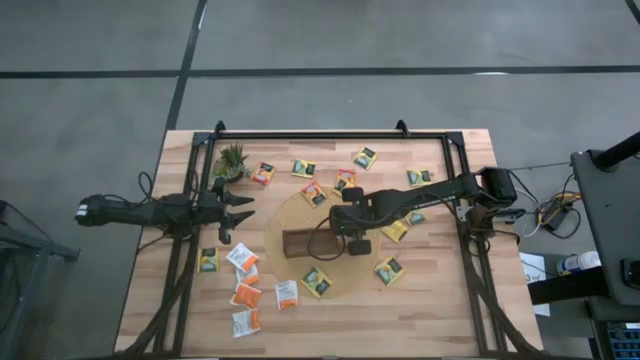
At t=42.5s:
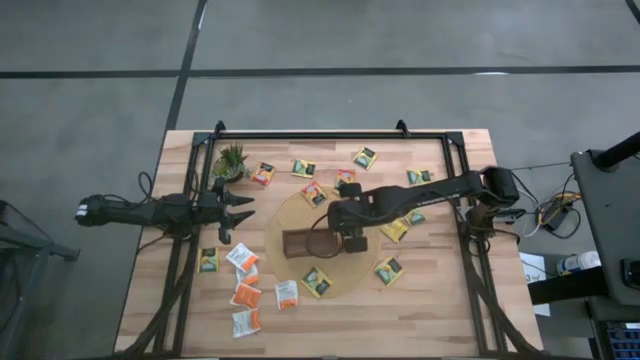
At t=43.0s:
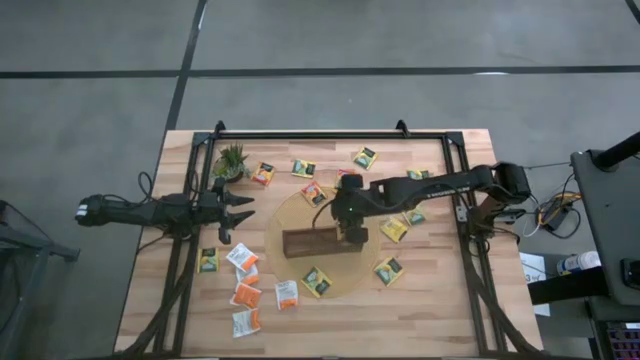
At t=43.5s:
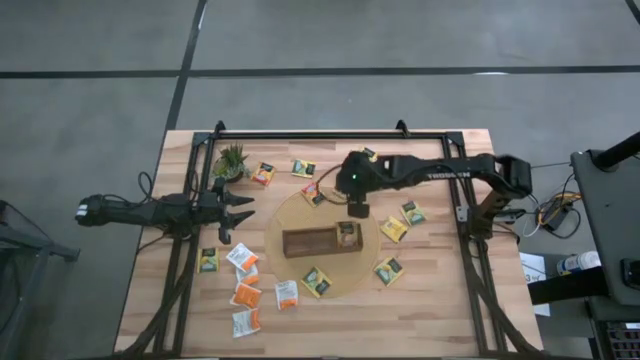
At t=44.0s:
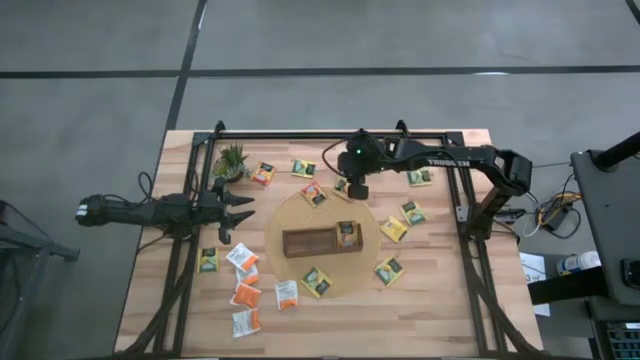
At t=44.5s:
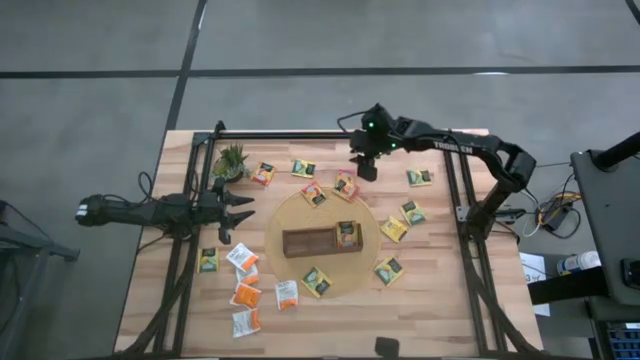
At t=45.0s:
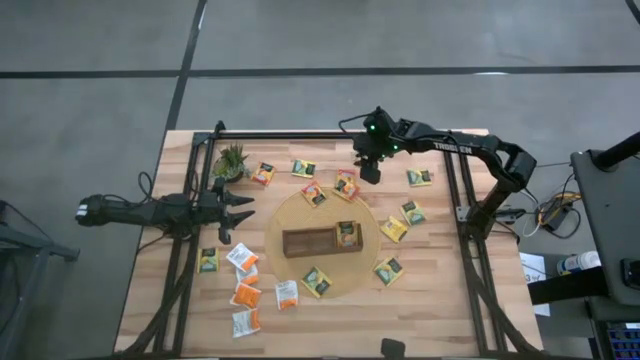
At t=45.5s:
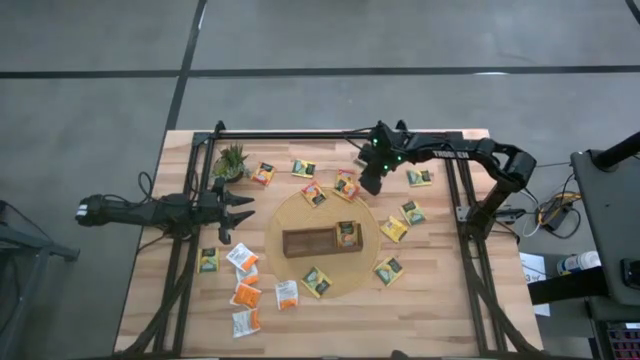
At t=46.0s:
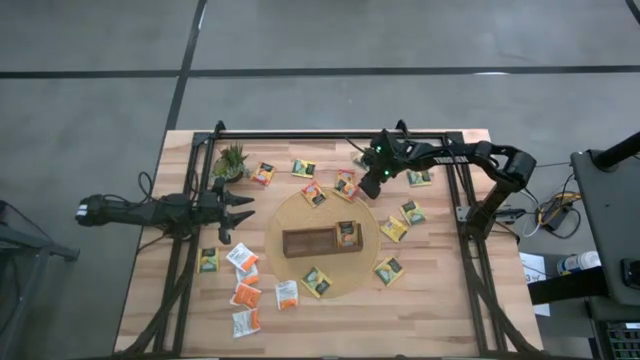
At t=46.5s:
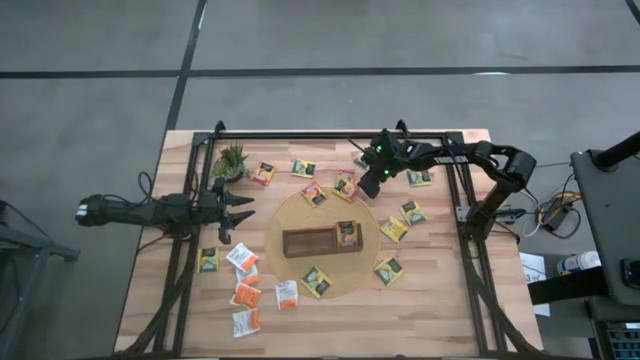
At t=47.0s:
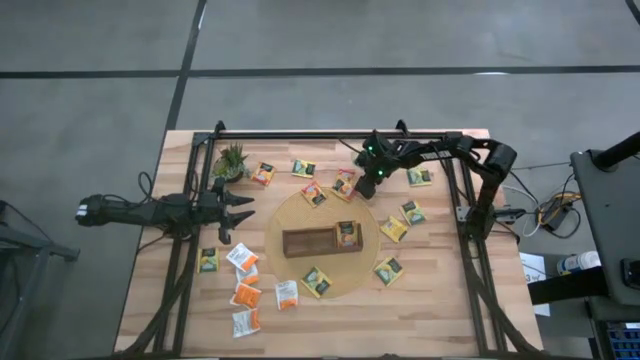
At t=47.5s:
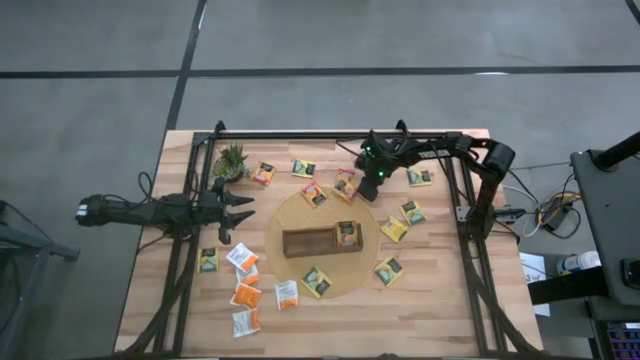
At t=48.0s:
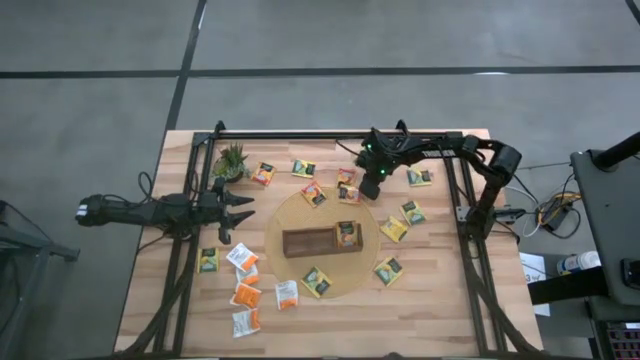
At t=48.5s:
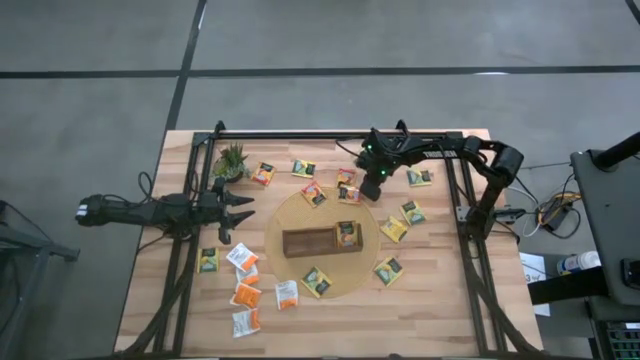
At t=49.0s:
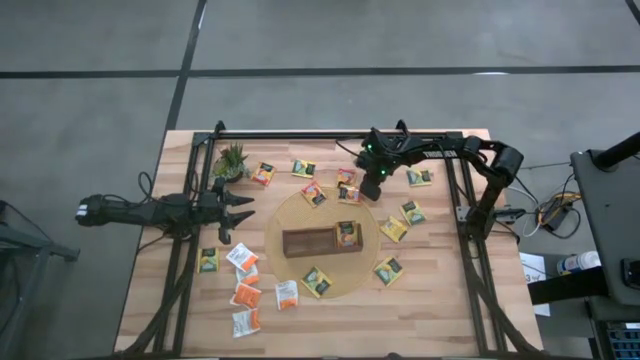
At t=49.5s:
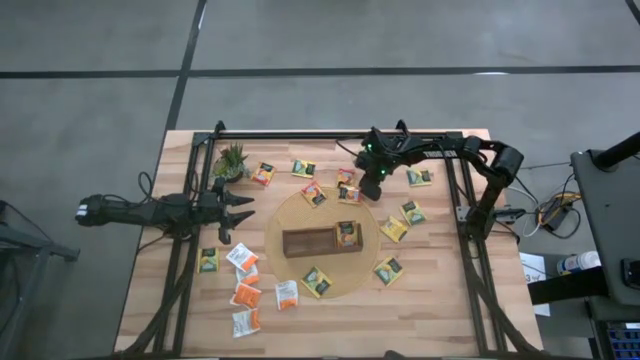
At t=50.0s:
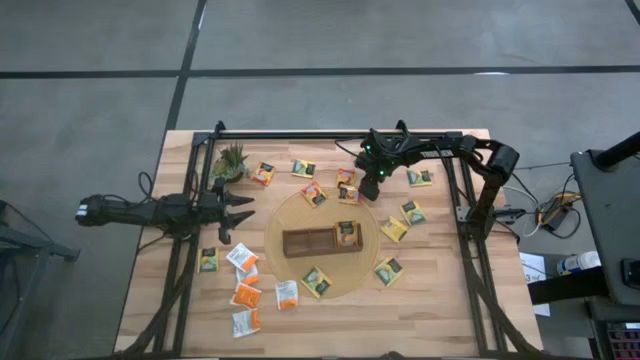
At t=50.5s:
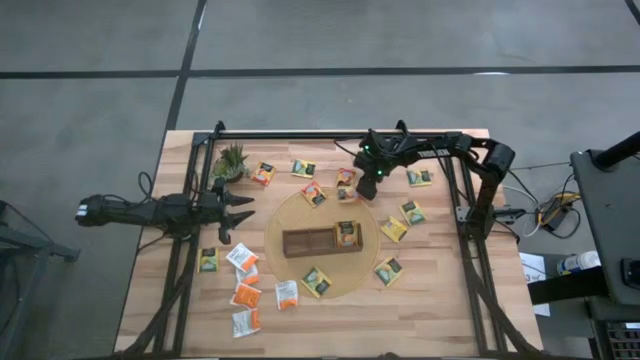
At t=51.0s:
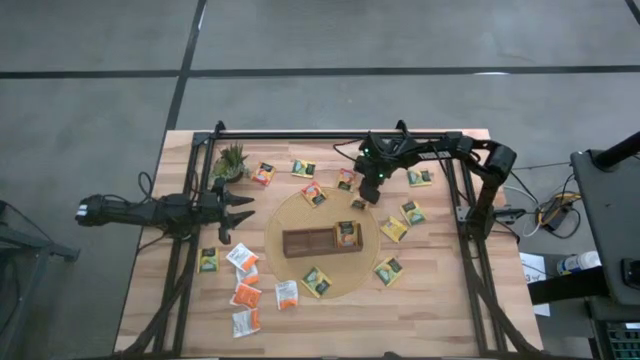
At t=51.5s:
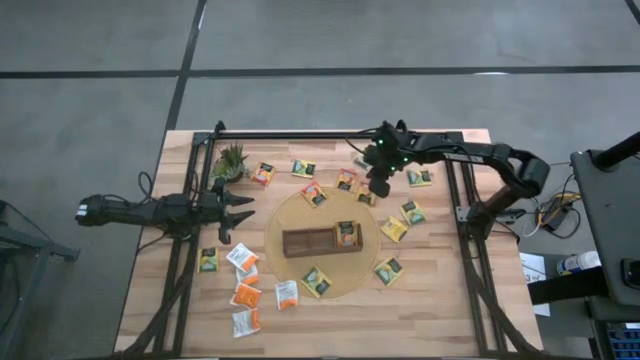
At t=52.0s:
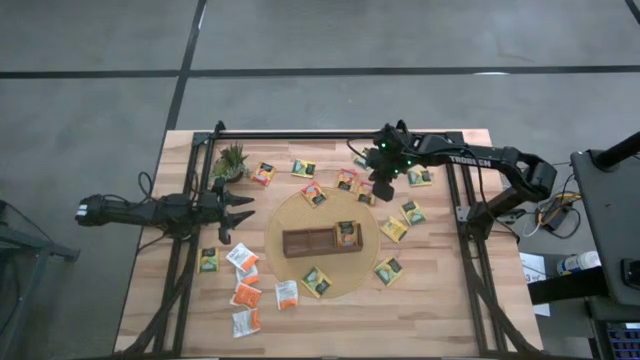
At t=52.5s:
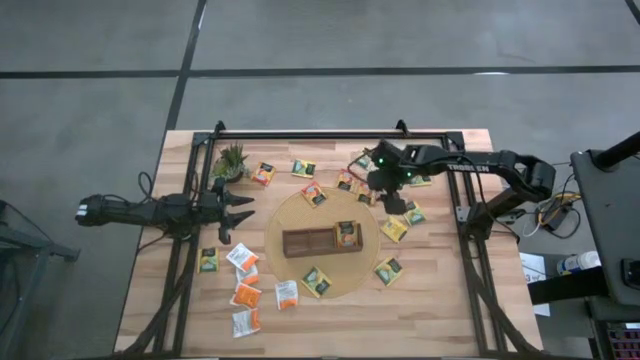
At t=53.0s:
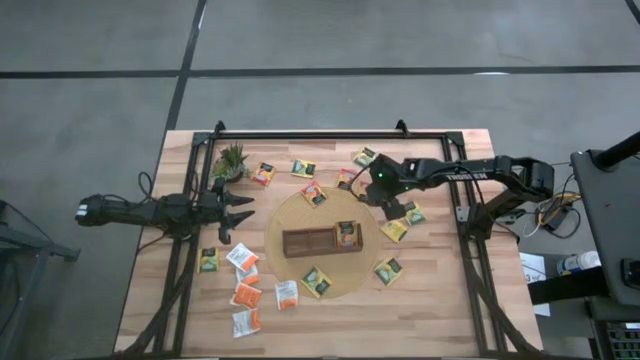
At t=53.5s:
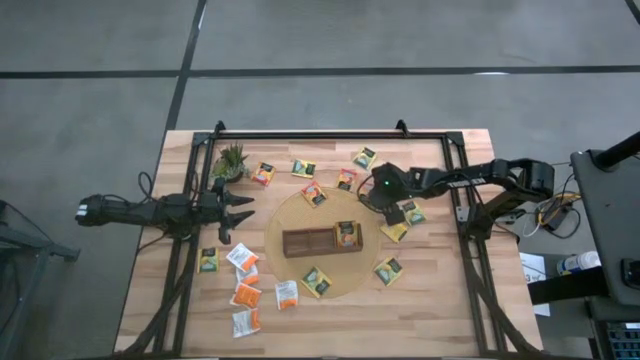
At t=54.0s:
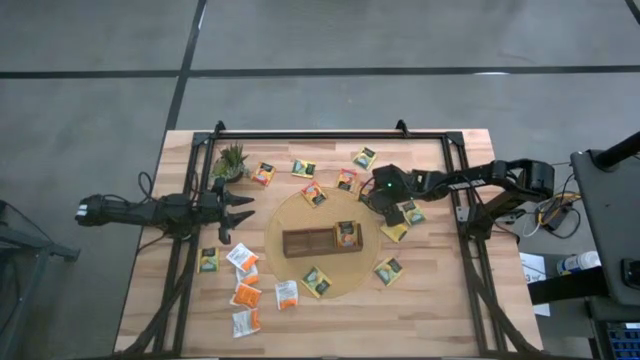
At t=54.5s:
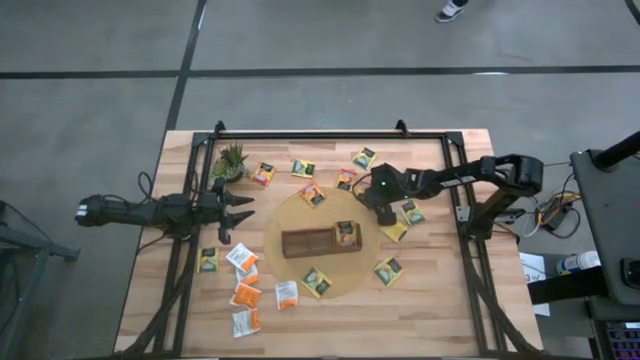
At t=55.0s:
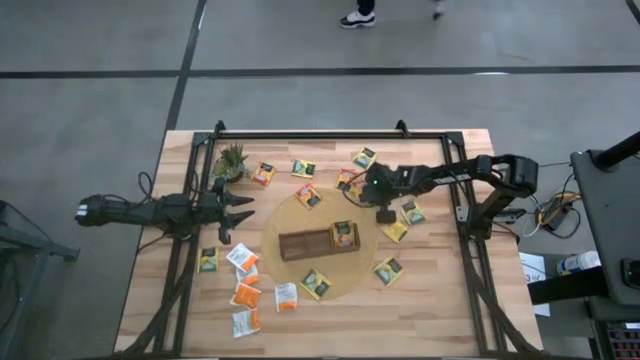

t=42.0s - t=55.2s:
Task: Pick & Place Tea
Put the orange tea bag into the right section of the wooden organizer

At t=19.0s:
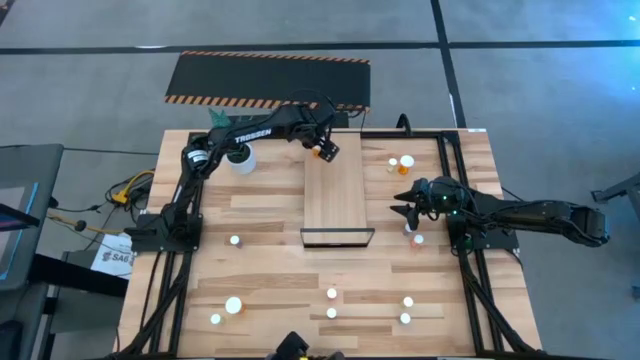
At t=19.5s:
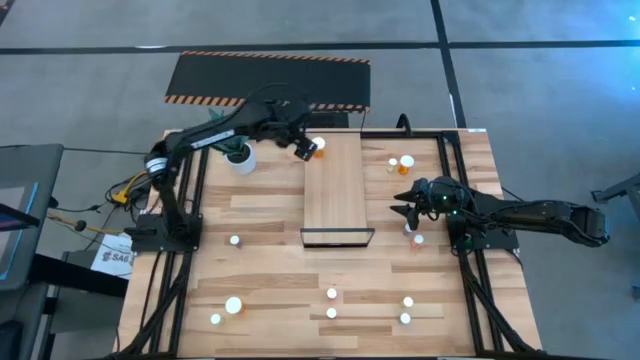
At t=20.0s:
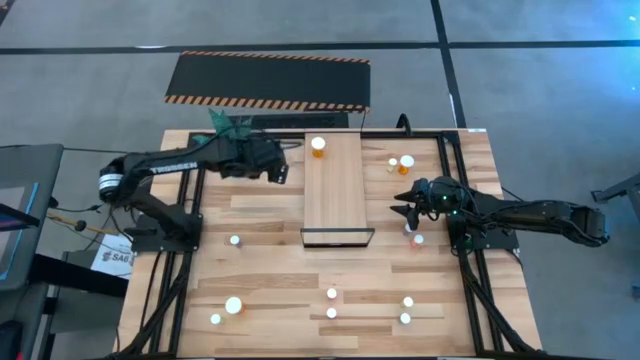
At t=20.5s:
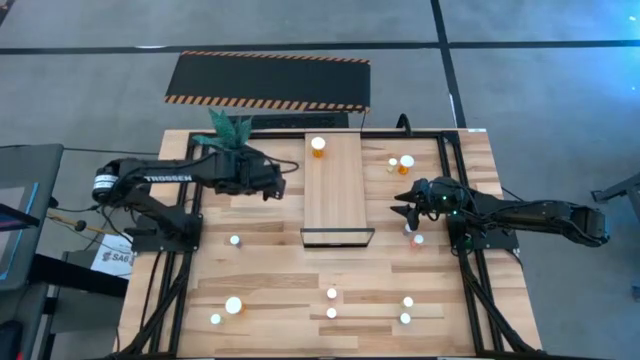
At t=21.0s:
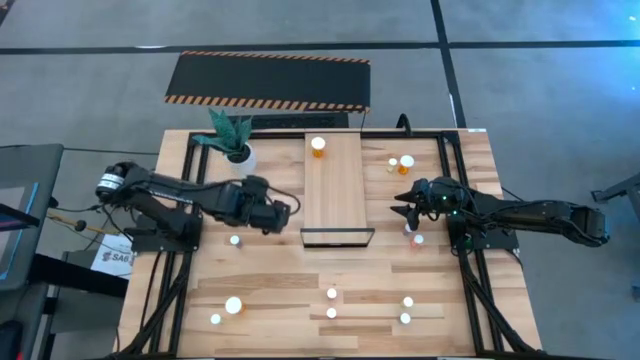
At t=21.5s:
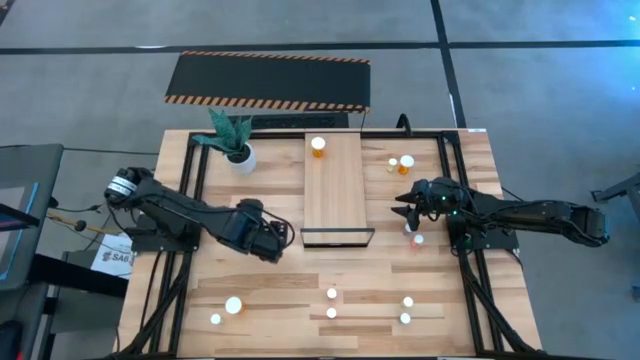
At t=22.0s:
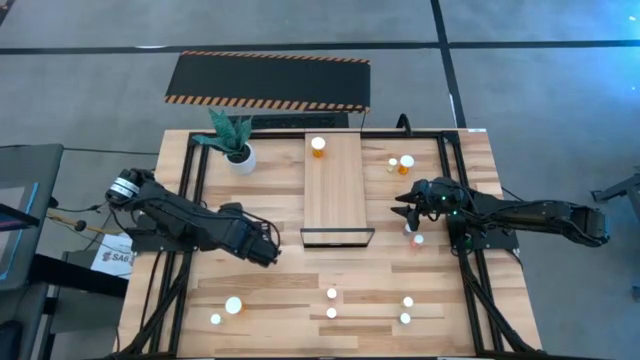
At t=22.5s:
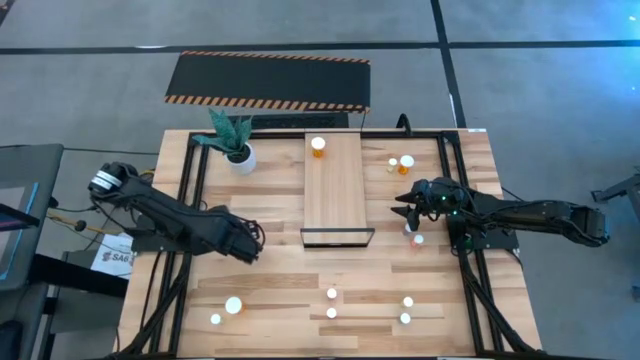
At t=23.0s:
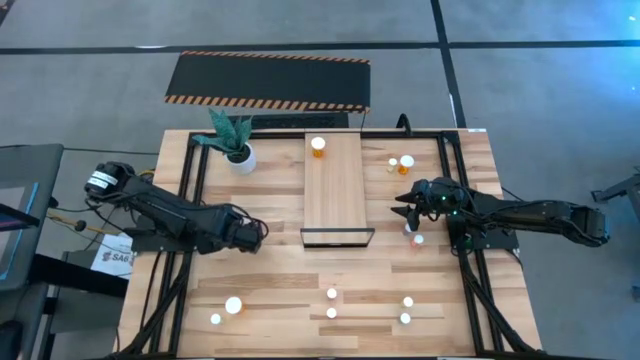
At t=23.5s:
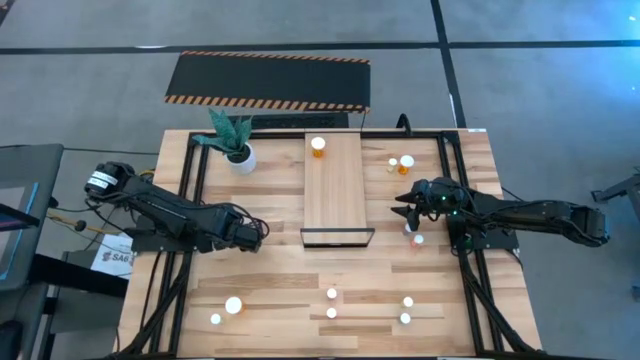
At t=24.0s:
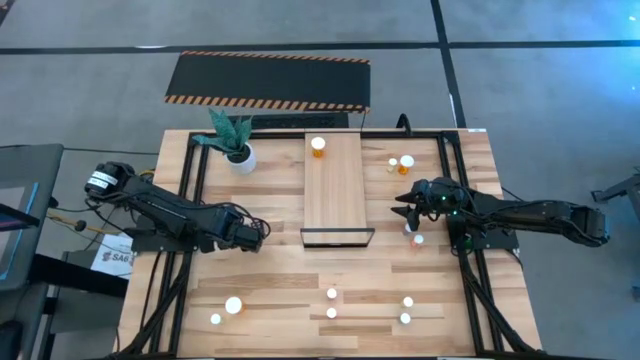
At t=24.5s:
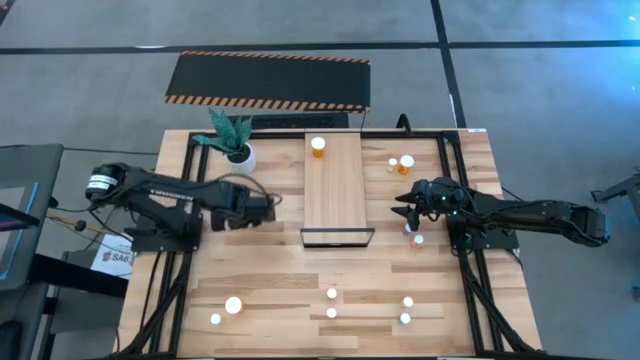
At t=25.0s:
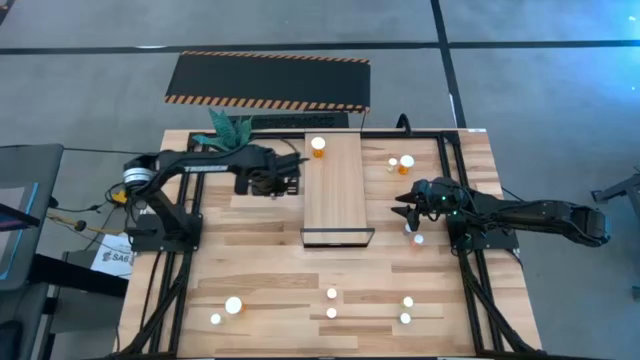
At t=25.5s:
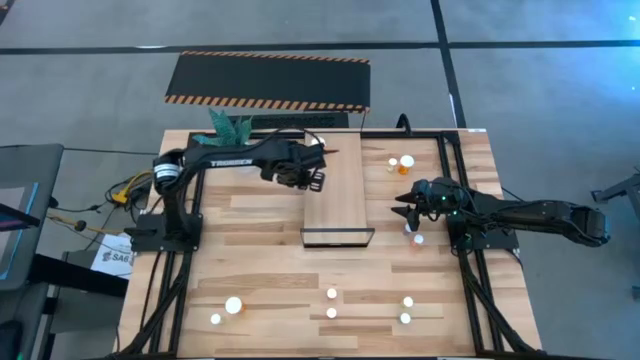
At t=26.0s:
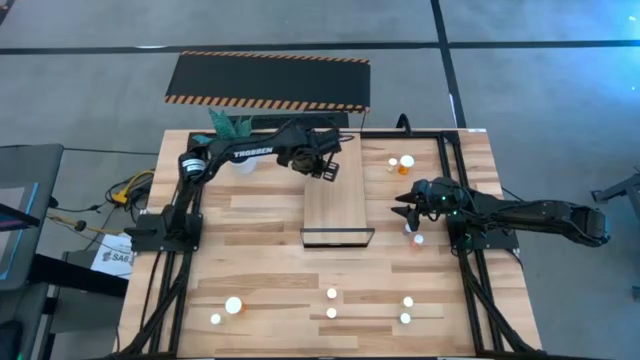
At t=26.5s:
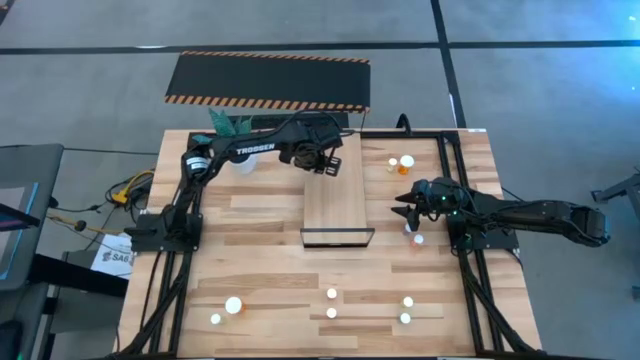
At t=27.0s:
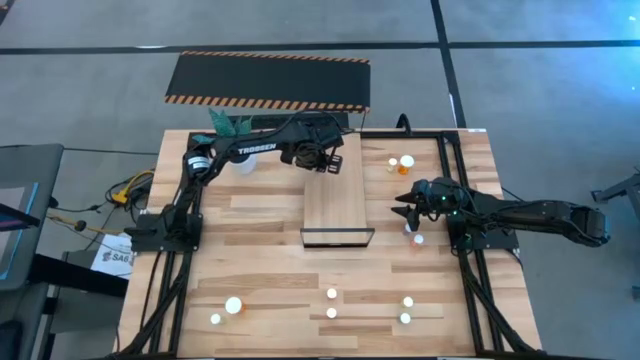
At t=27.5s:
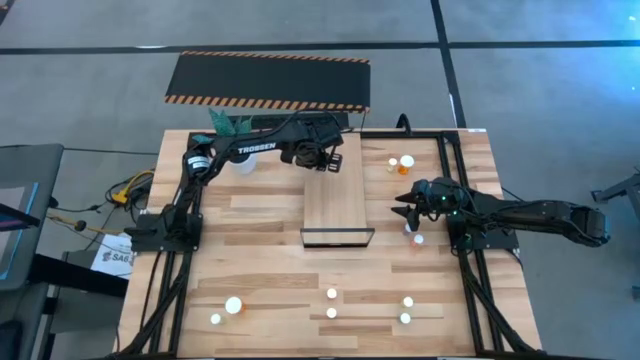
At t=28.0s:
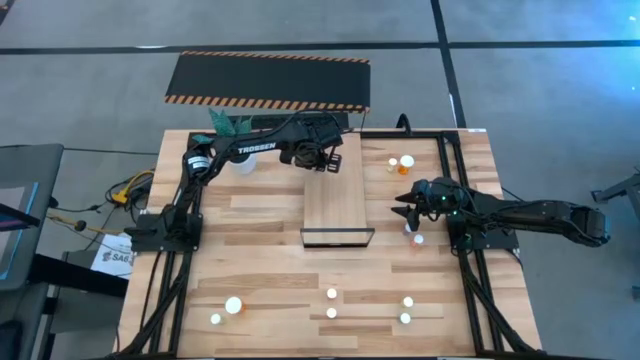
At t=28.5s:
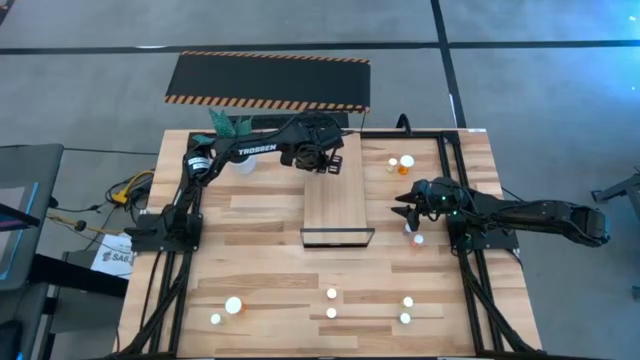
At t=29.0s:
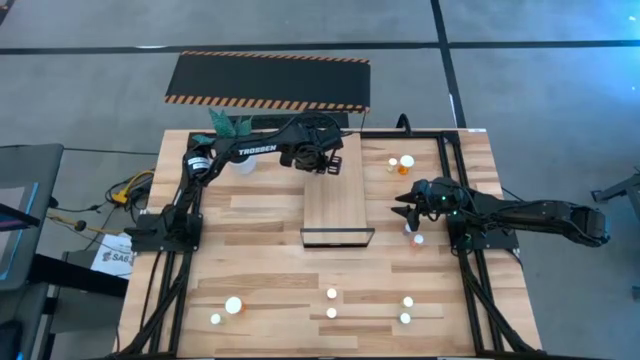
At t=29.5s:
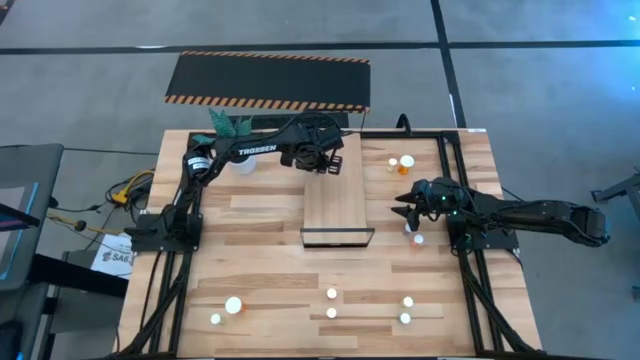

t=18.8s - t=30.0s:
Task: Pick and place medicine bottles onto shelf by color
Put the top left blue pill bottle on the shelf
